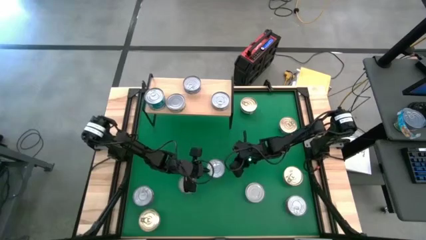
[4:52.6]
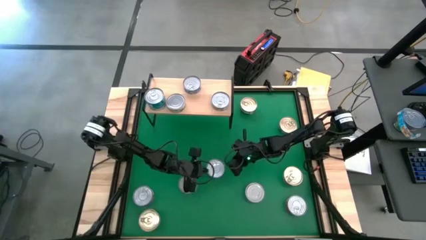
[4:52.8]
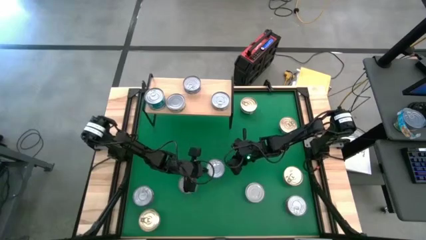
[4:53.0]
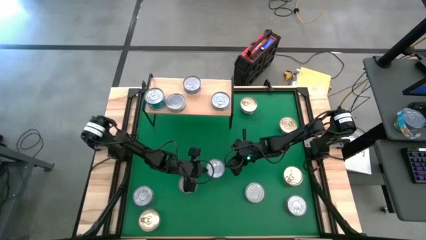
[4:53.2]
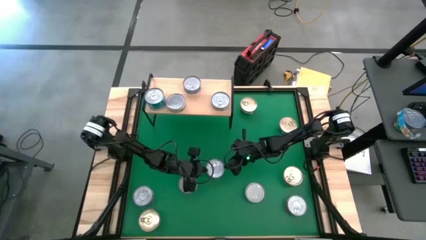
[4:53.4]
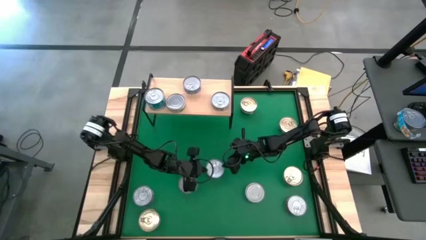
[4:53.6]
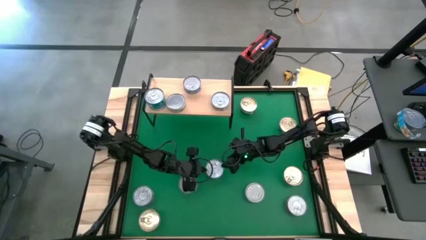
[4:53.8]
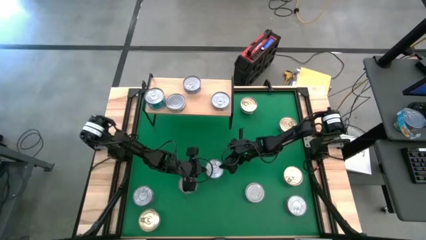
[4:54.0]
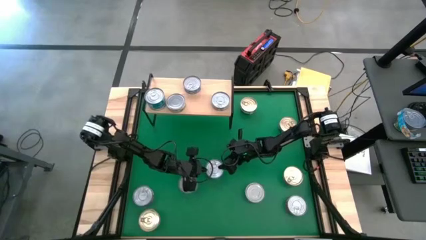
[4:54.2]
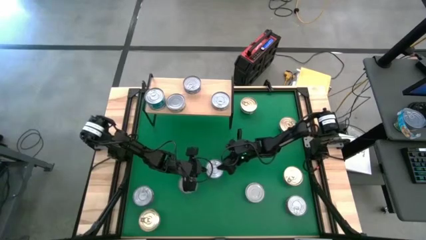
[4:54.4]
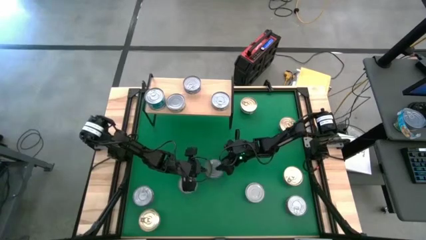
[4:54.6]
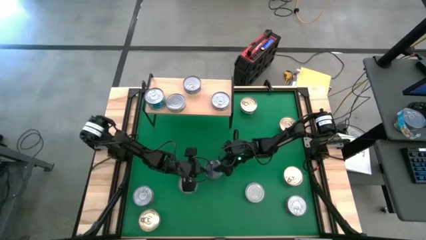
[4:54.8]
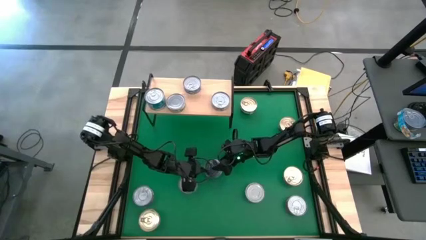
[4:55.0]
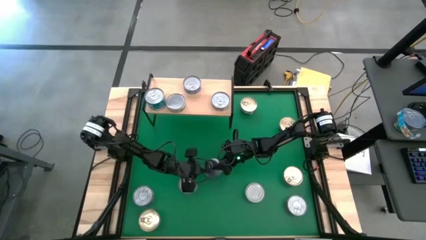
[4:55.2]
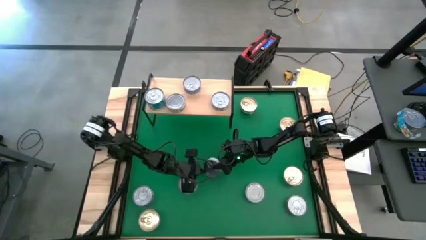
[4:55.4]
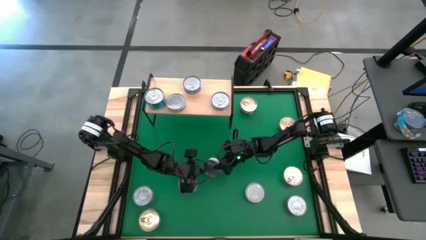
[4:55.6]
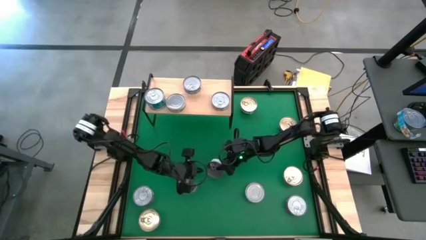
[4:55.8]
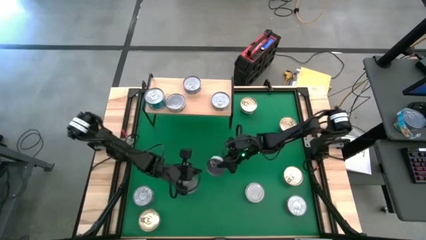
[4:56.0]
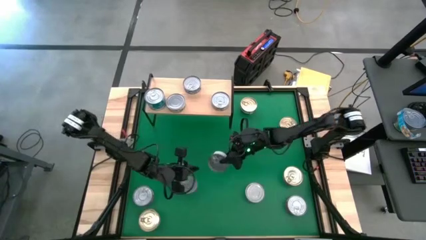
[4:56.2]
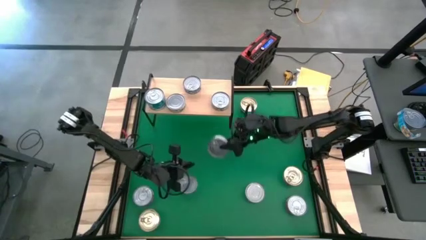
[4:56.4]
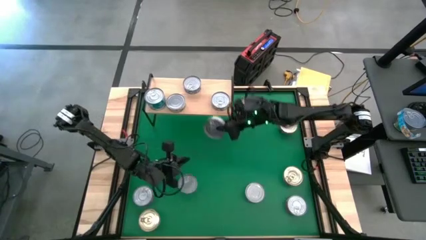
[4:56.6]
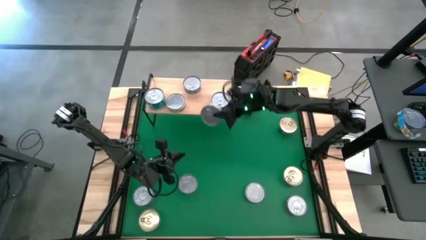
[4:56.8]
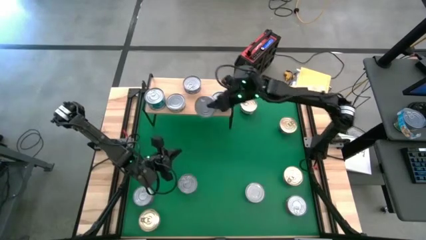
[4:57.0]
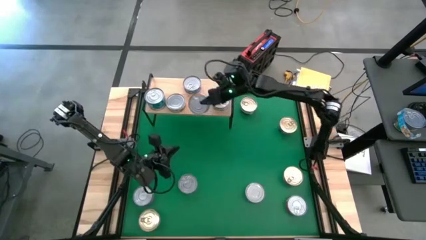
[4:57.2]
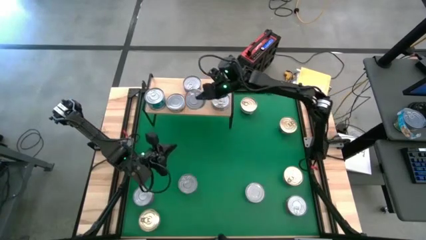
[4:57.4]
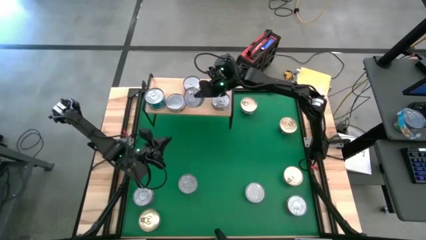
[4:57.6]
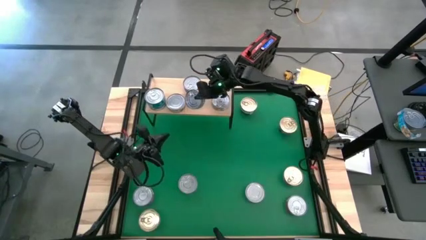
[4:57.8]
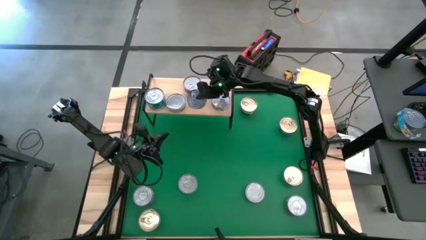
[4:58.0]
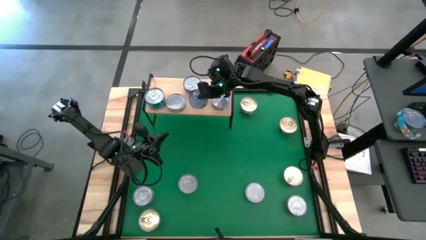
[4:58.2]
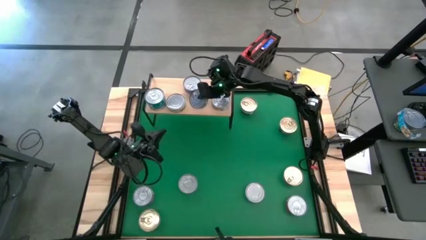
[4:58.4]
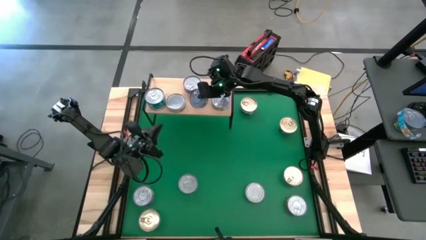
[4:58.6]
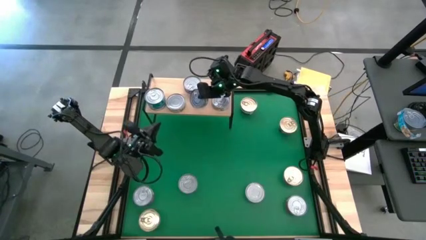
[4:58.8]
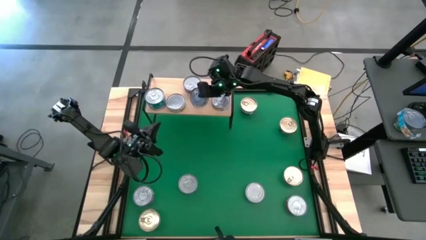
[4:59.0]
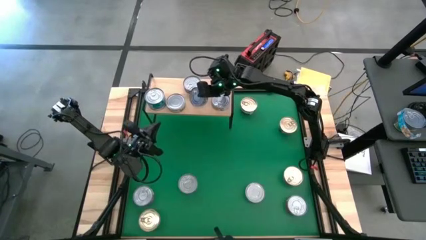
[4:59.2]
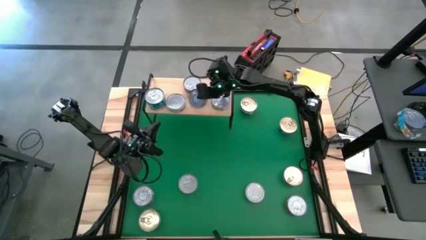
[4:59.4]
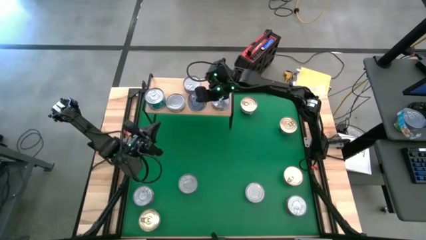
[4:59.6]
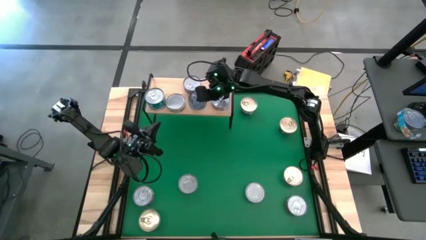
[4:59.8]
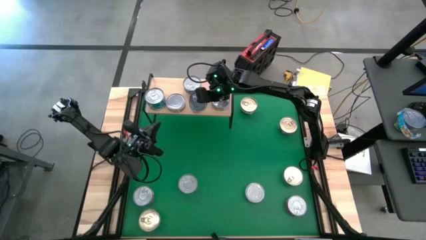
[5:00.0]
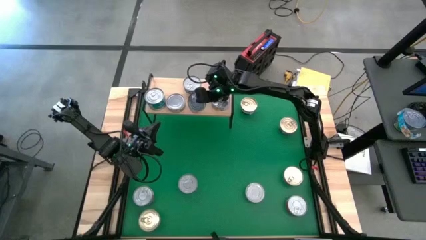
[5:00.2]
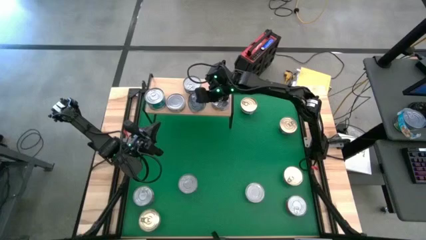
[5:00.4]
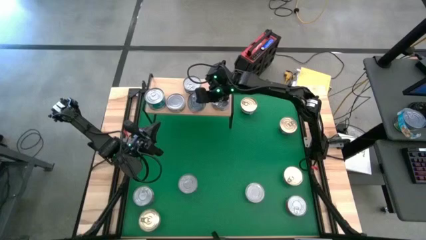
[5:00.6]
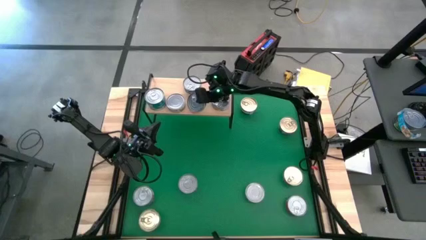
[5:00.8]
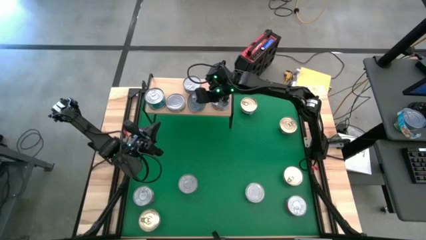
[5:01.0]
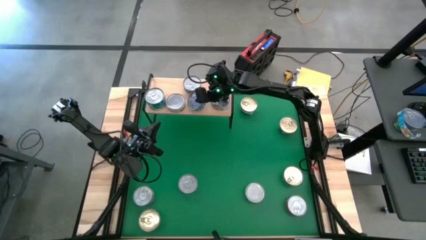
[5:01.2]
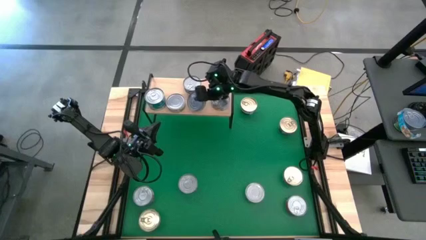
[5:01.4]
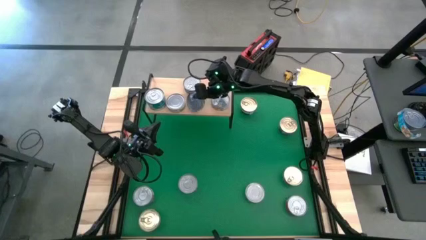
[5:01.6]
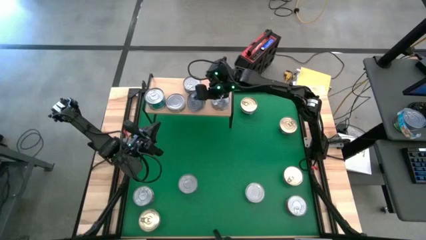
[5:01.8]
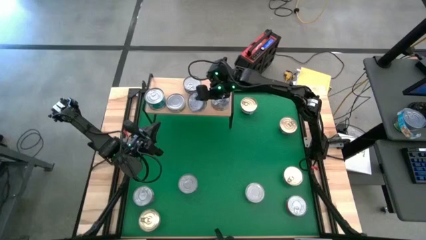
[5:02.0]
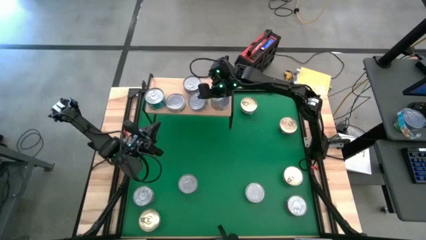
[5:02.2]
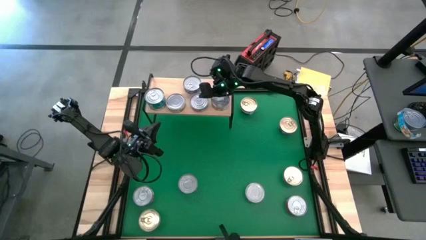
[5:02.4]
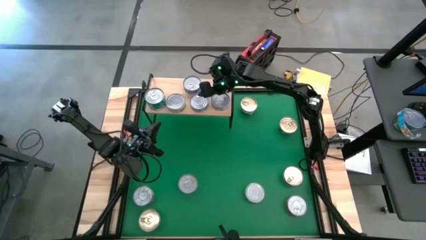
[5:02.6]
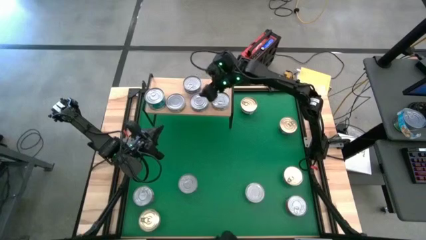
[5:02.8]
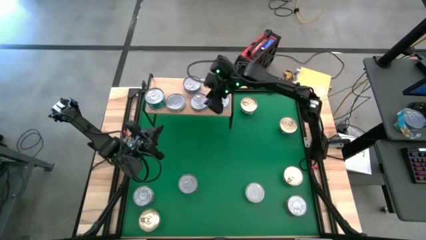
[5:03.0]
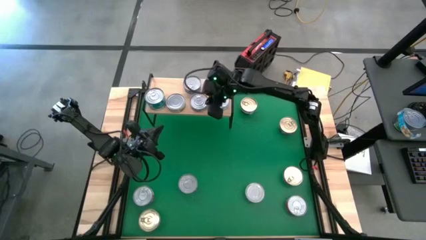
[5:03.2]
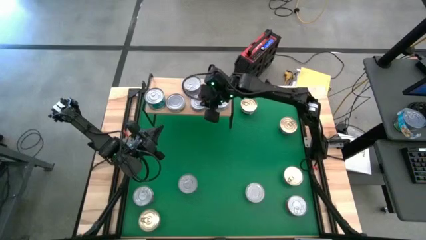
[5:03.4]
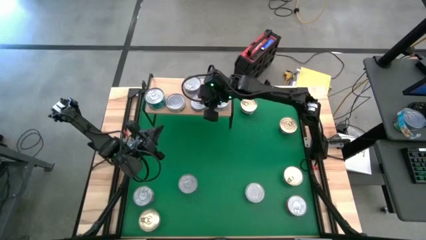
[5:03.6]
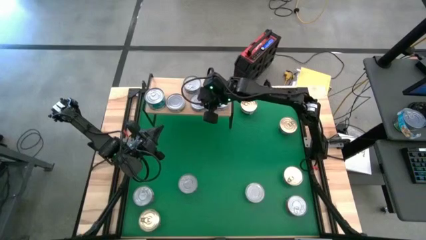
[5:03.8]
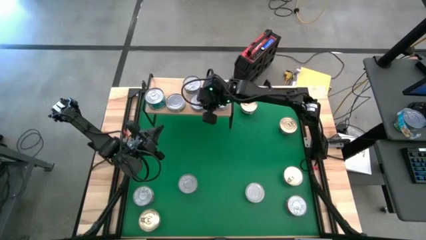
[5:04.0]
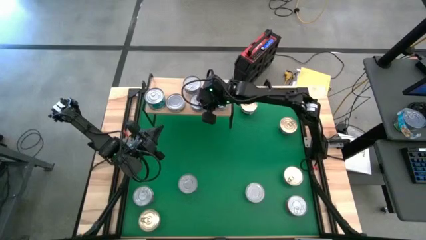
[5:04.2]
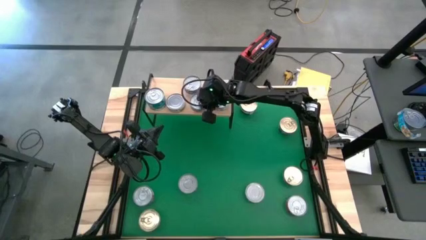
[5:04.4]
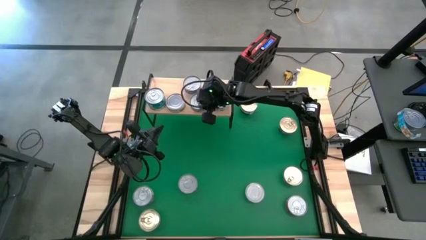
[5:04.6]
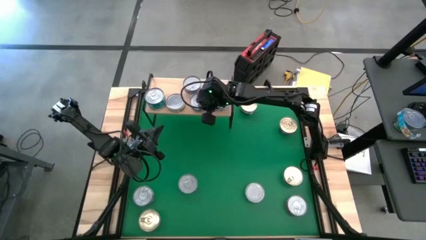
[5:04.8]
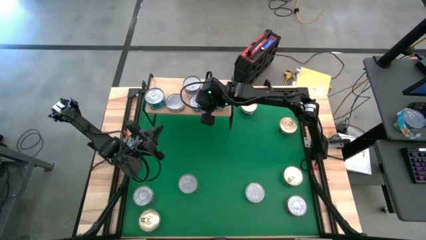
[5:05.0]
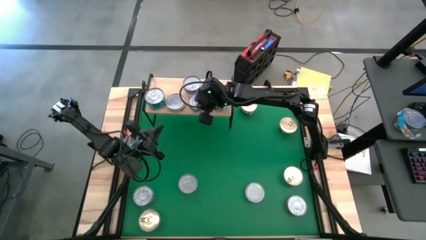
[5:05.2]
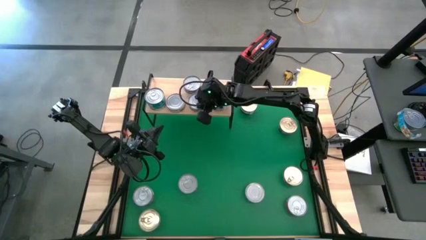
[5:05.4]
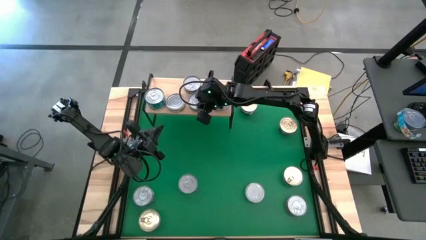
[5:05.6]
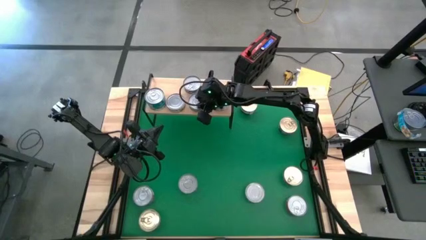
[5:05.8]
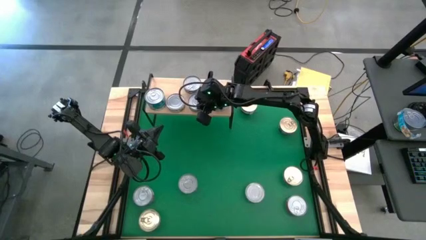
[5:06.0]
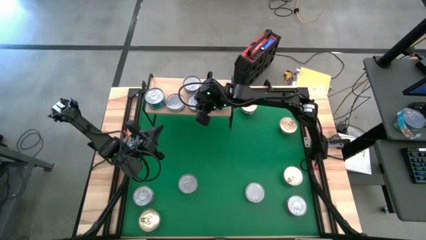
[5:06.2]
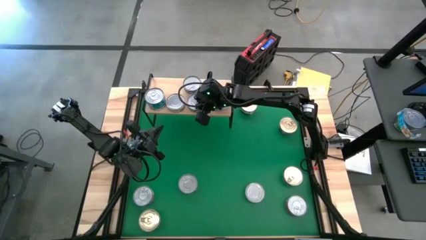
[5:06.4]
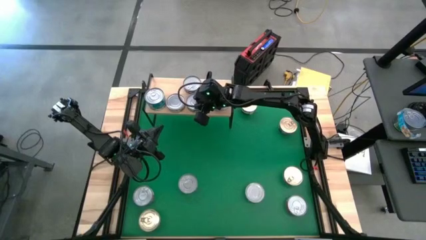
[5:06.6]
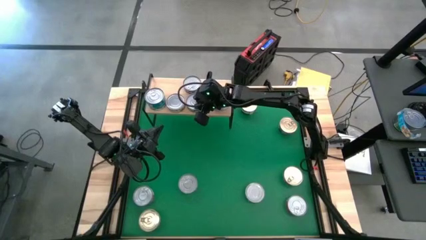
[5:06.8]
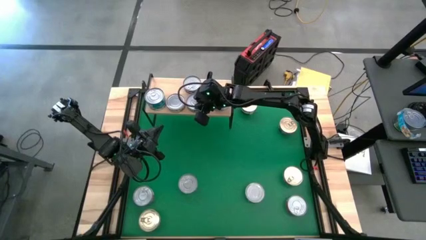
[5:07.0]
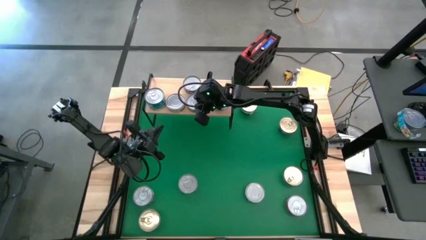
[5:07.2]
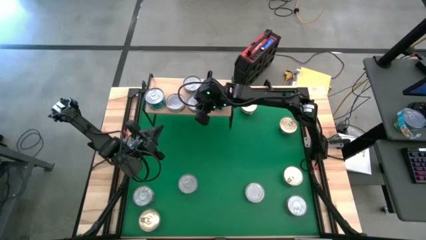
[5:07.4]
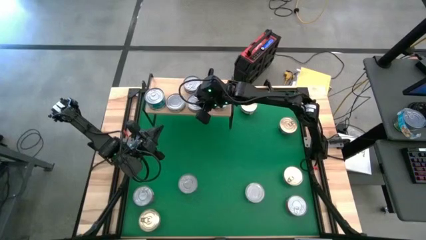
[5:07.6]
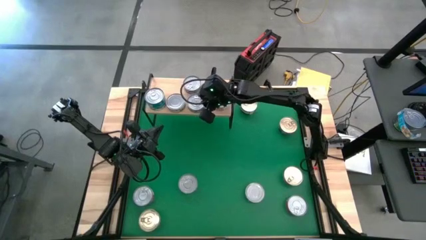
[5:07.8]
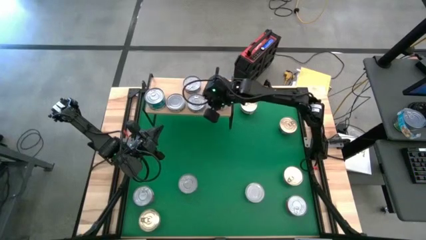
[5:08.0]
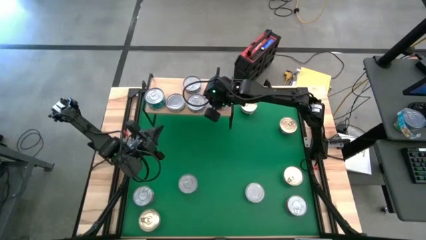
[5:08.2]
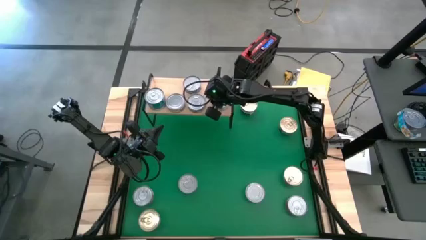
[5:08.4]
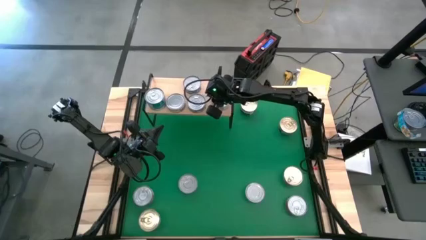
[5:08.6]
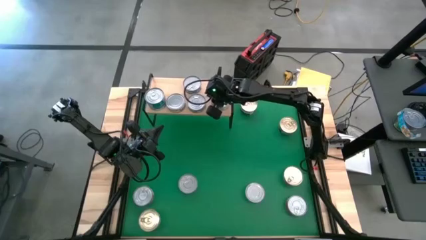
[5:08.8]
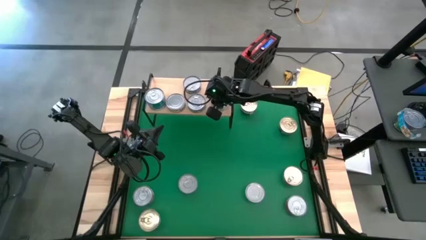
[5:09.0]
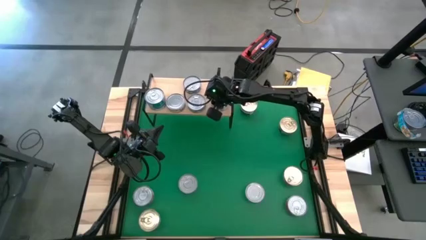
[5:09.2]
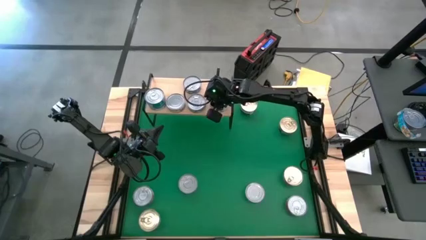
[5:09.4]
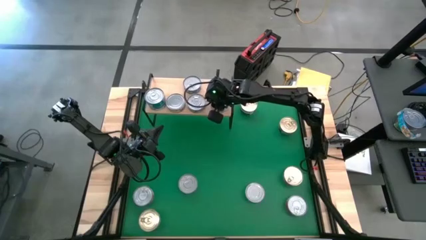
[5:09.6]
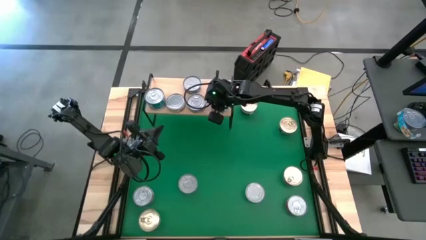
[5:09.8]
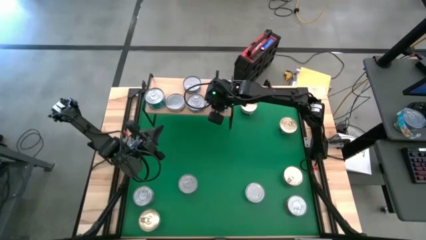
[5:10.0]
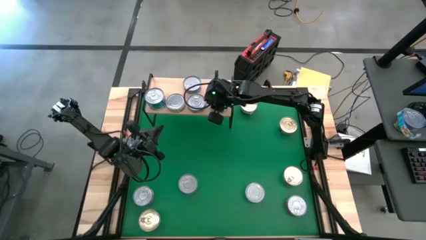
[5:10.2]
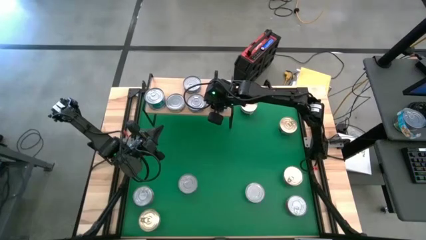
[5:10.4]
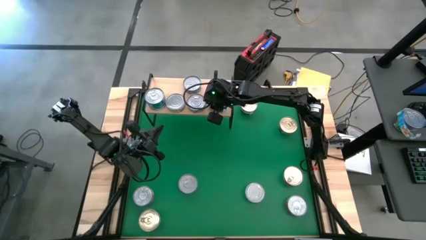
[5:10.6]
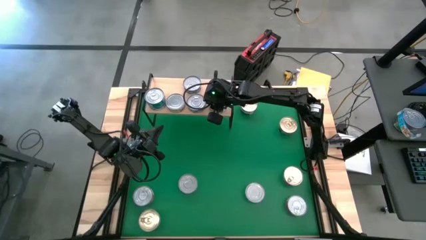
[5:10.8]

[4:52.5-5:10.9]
Task: Stack canned seafood by type on shelf
Put the center green tuna can on the shelf
